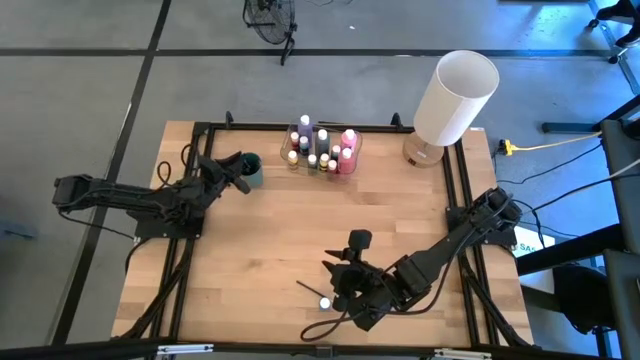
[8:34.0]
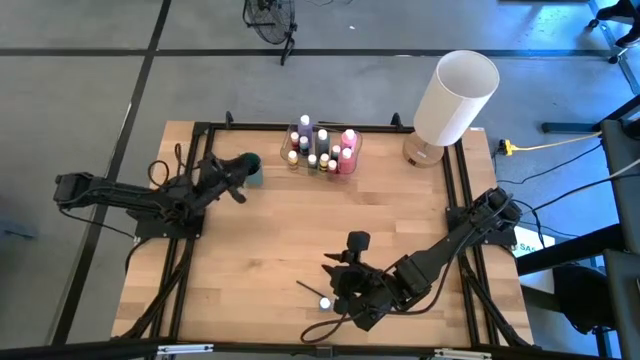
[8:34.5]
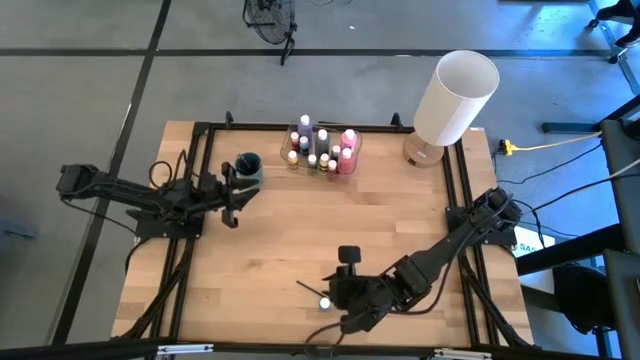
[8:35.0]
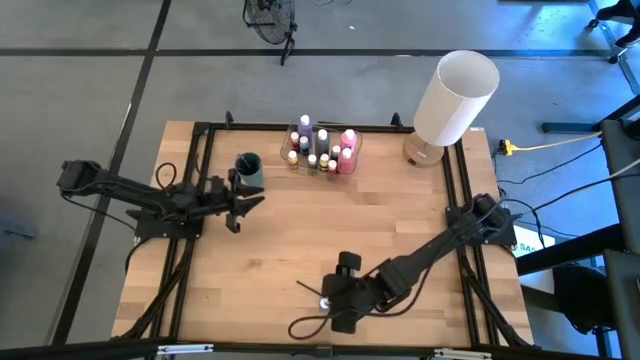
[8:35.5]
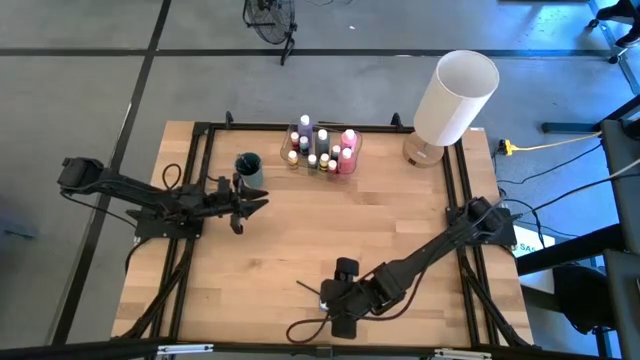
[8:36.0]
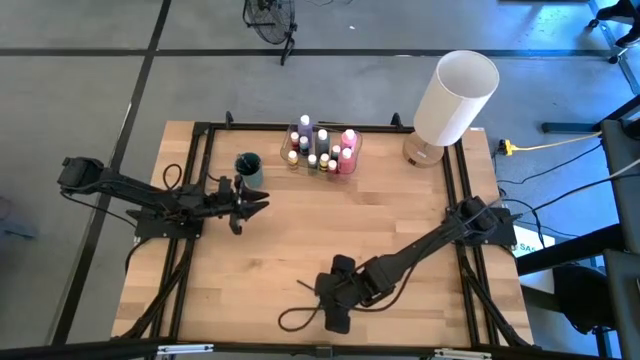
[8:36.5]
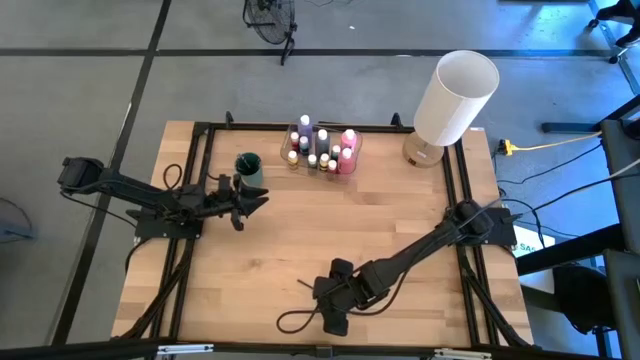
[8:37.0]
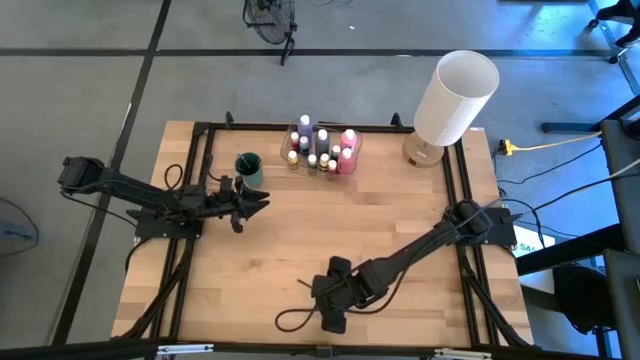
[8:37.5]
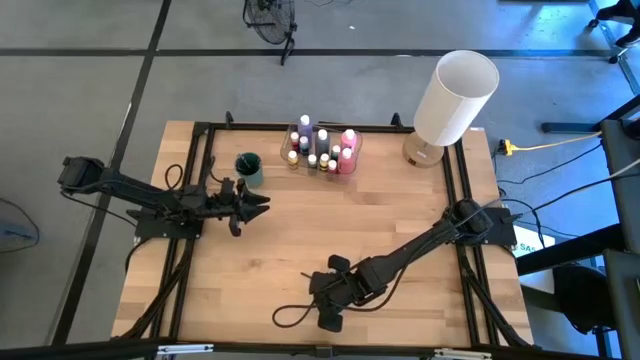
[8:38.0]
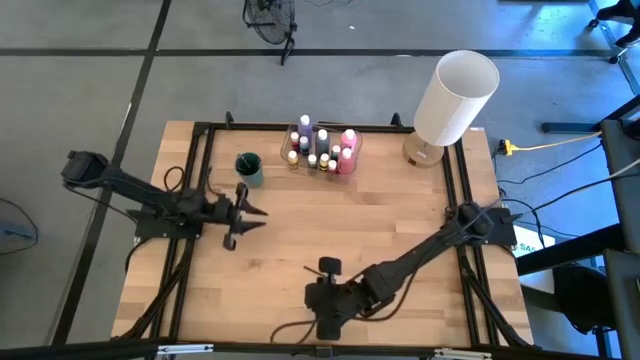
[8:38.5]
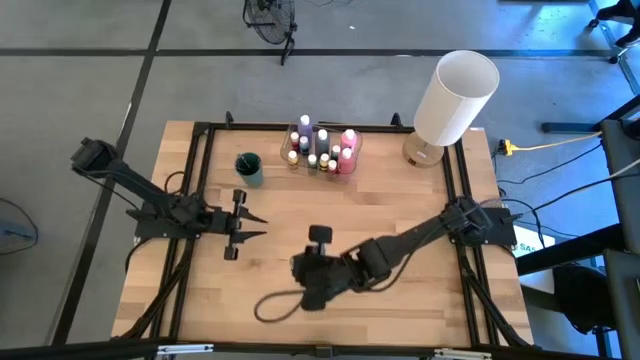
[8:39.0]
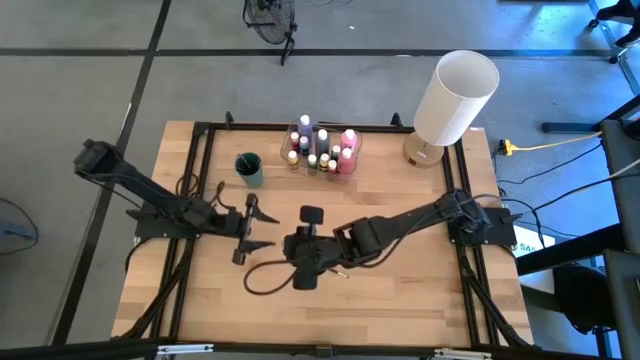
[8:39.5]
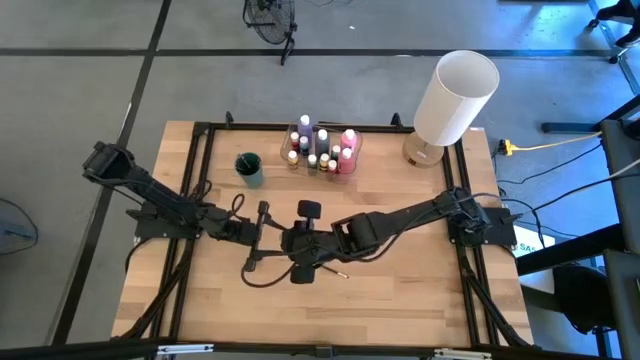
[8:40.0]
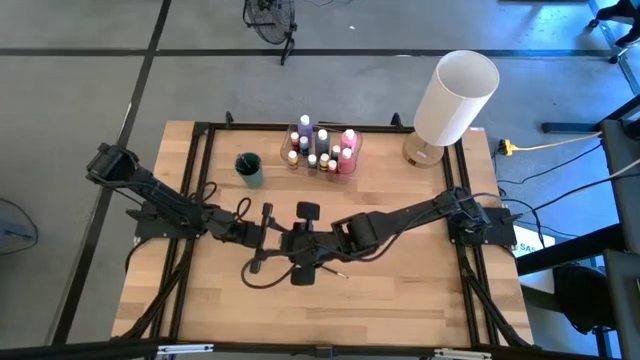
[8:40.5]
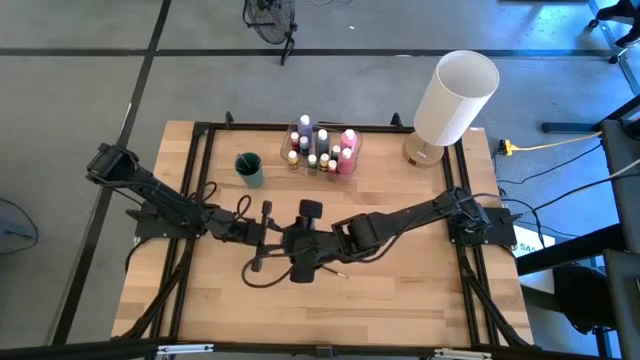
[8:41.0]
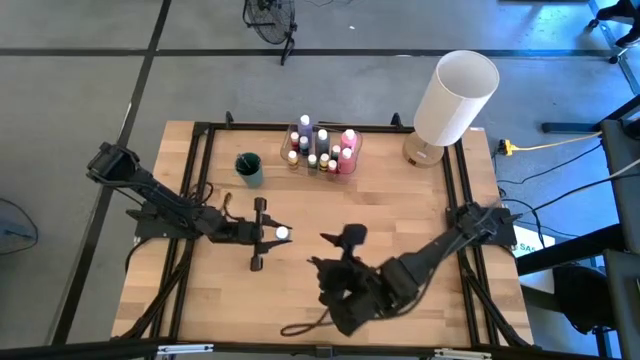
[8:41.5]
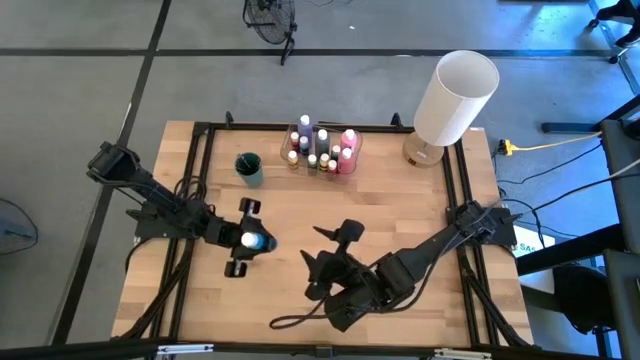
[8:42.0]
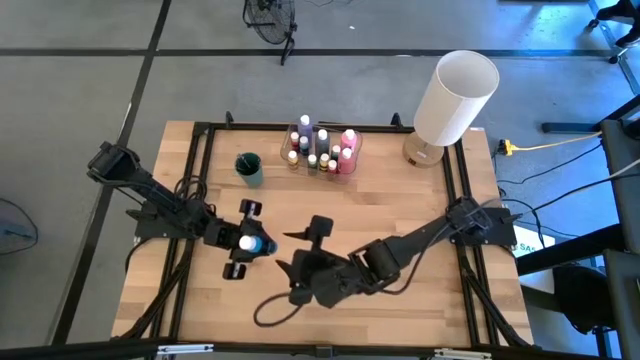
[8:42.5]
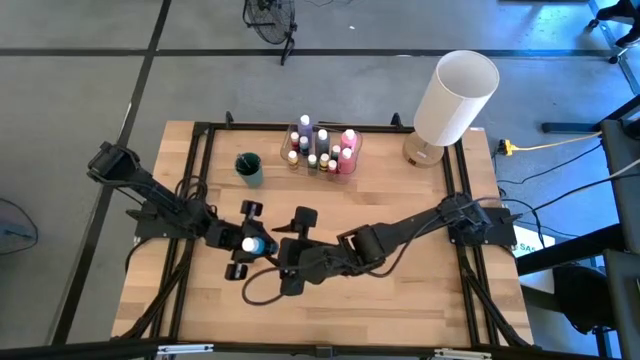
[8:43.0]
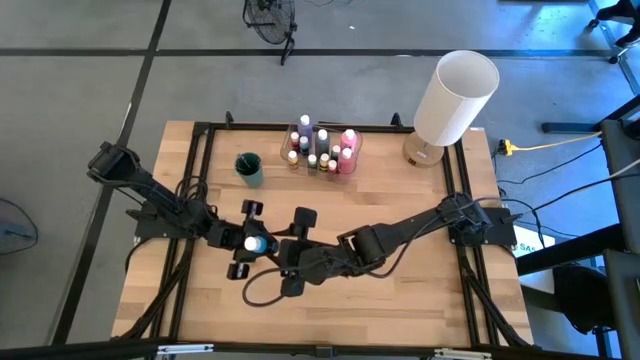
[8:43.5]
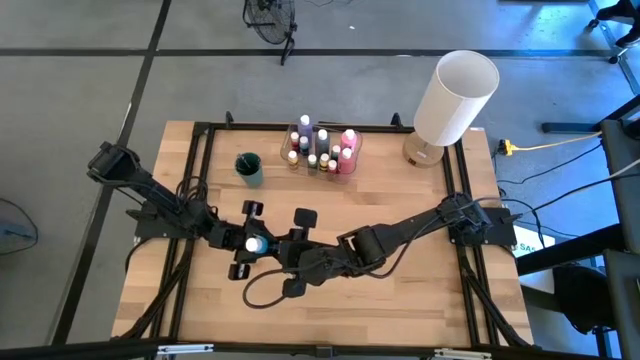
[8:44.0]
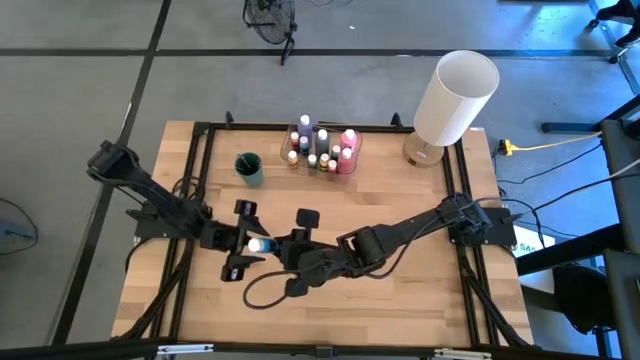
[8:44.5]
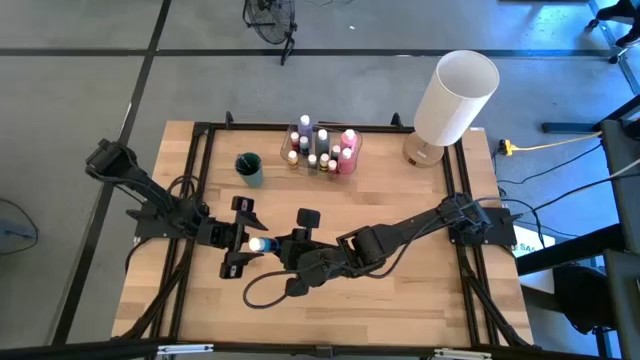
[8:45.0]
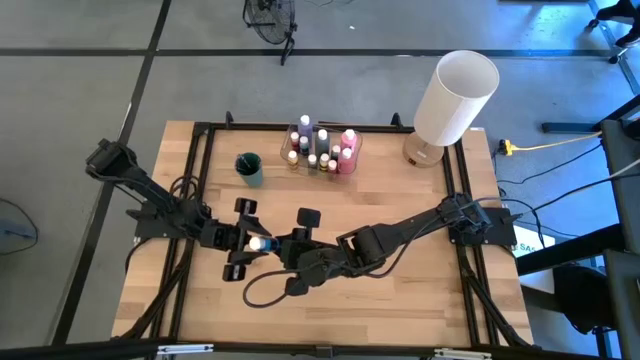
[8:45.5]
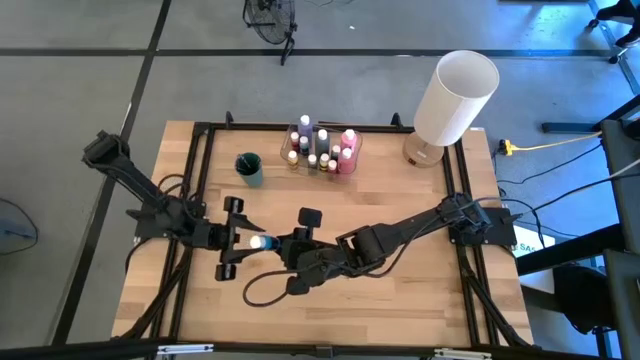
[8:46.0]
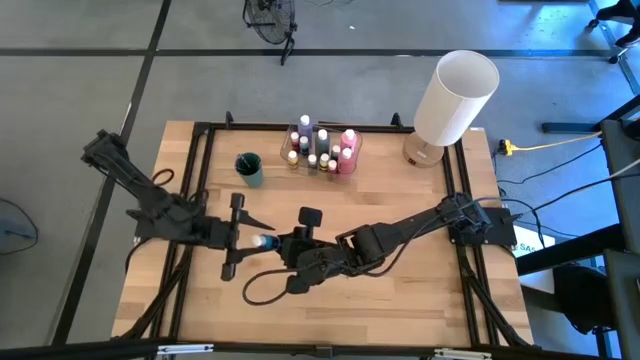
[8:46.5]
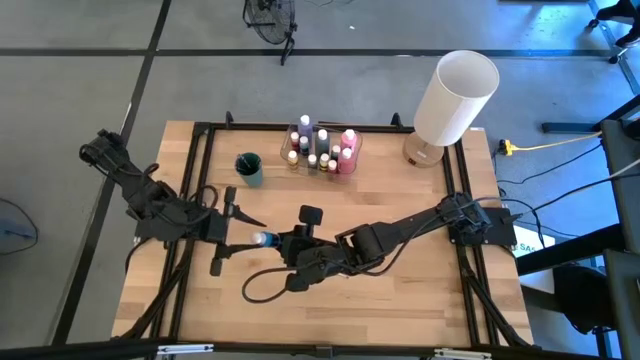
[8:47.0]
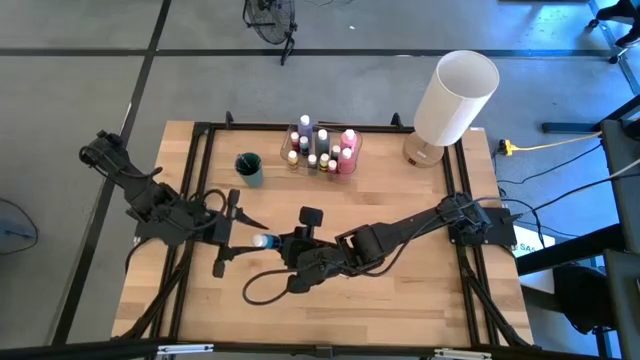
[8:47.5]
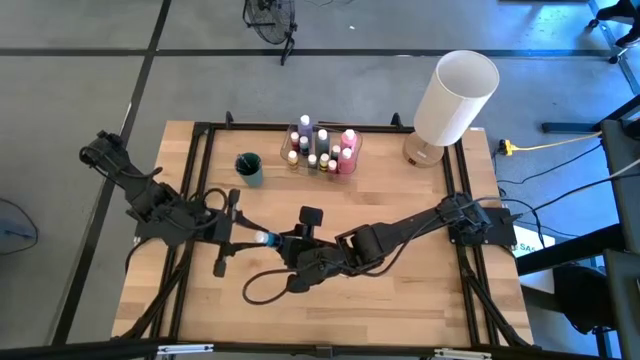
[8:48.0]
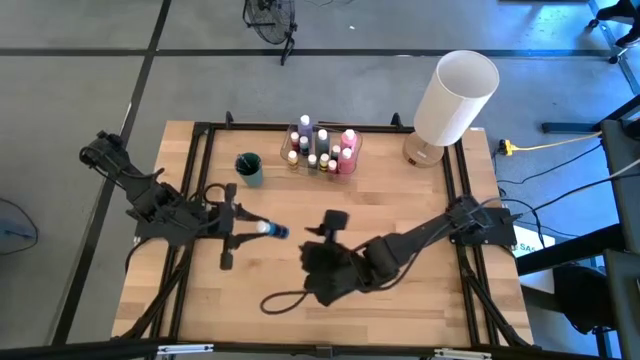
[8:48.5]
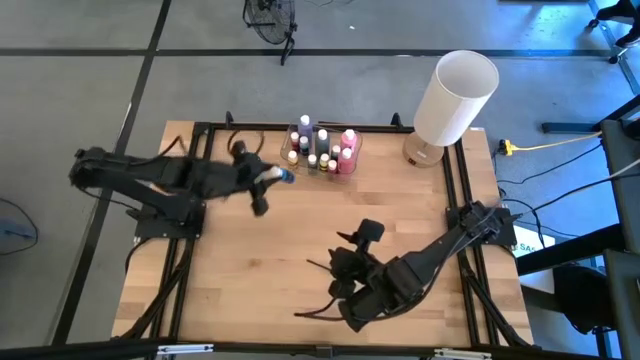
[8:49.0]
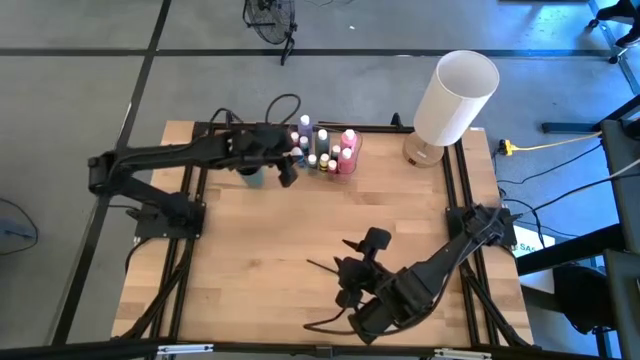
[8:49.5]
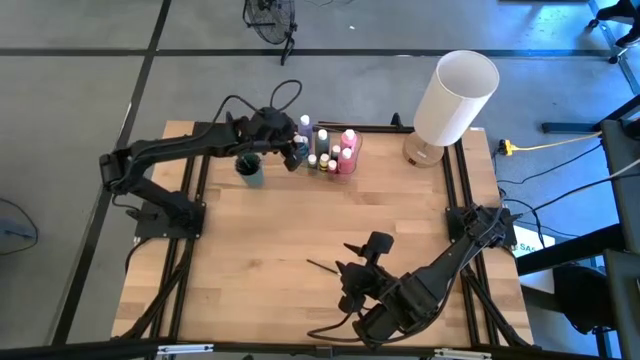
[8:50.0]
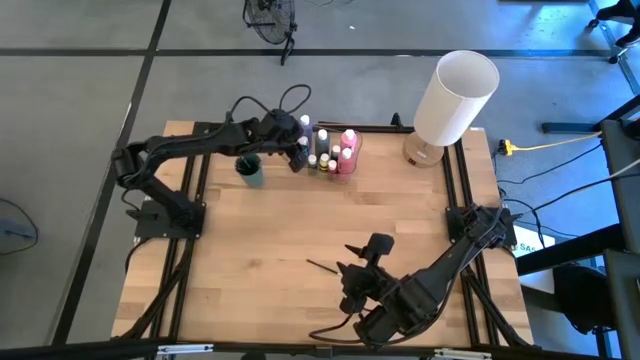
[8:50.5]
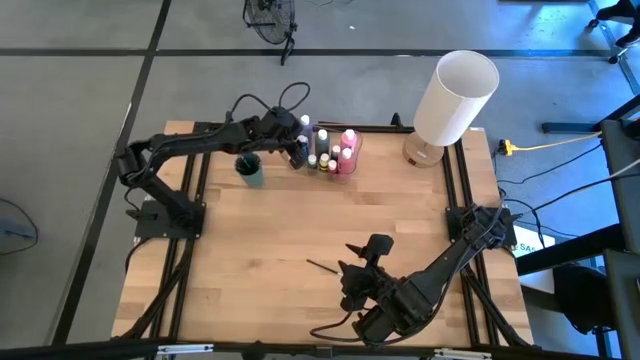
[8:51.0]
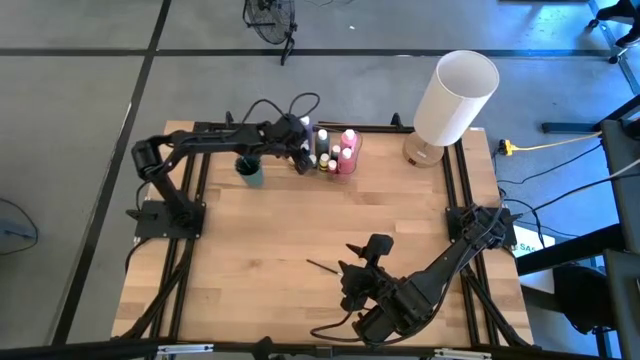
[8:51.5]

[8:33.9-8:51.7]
Task: Pick & Place Paint Supplies
Put the blue paint bottle into the transparent bin

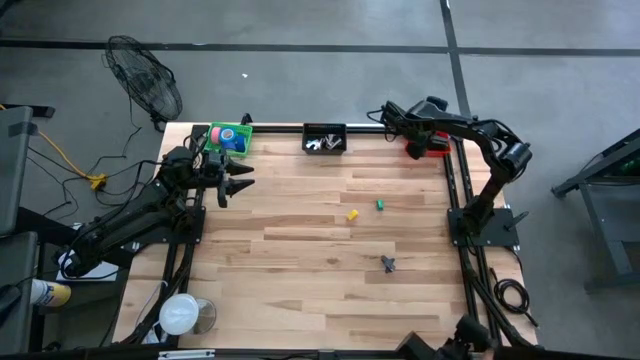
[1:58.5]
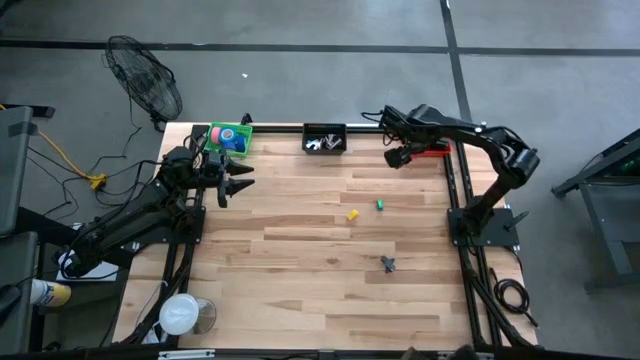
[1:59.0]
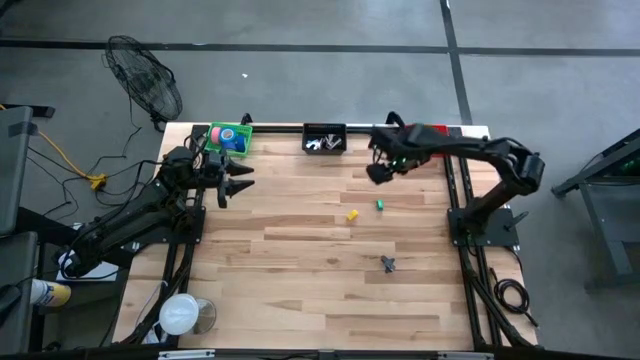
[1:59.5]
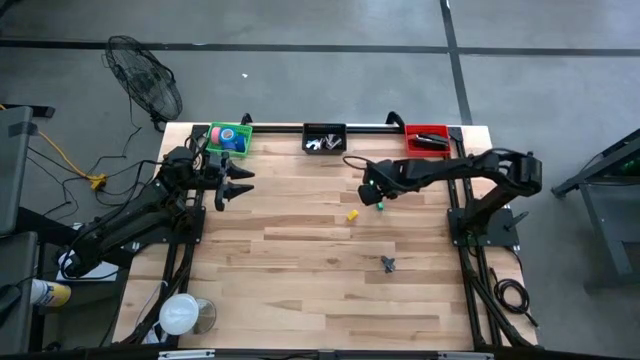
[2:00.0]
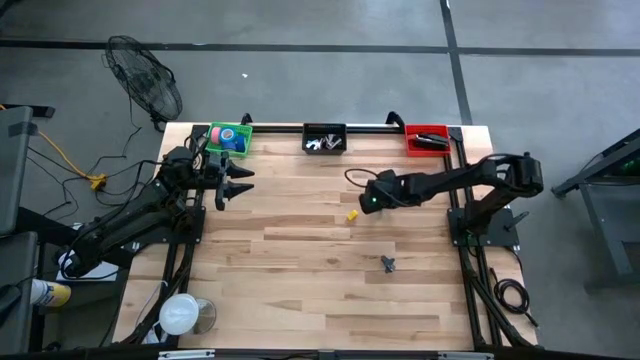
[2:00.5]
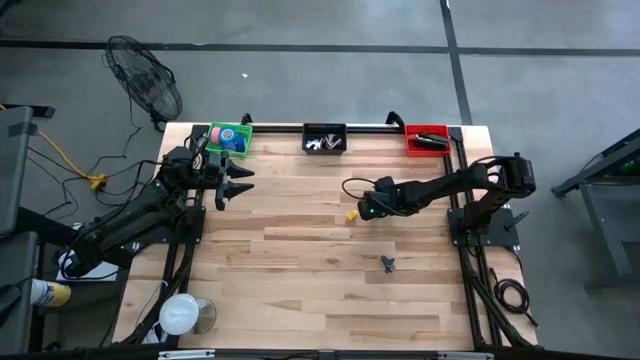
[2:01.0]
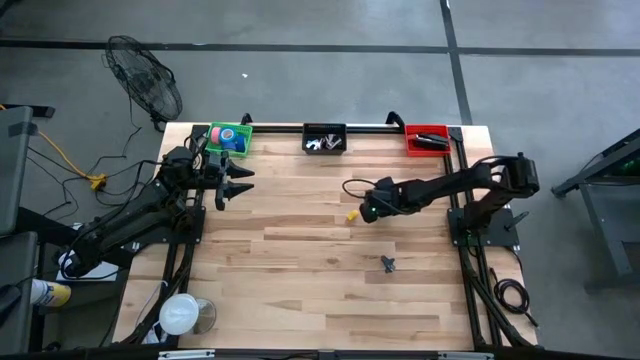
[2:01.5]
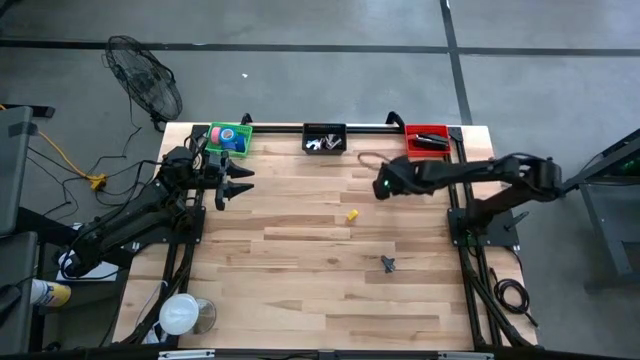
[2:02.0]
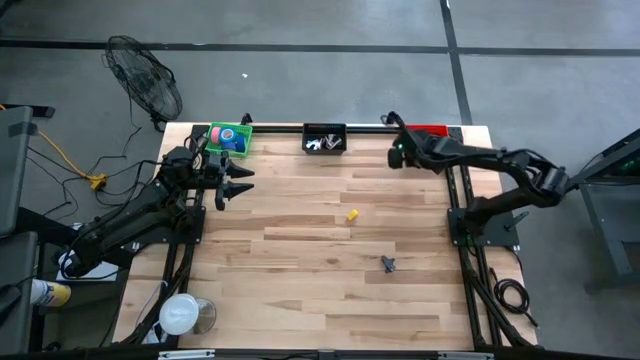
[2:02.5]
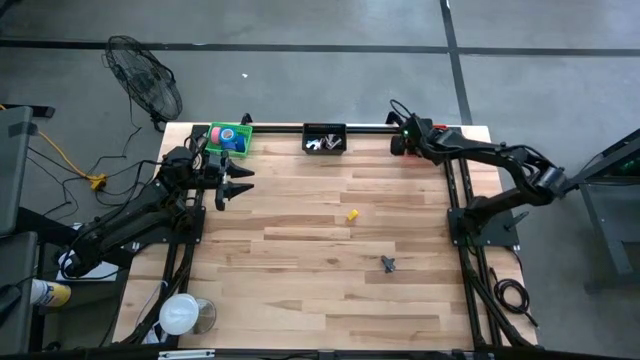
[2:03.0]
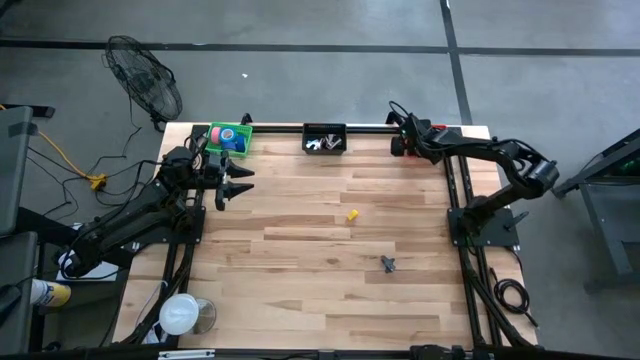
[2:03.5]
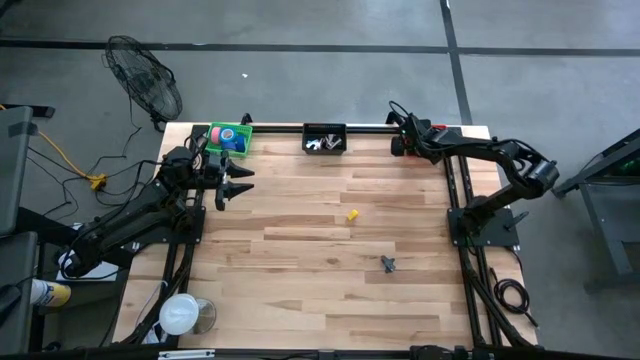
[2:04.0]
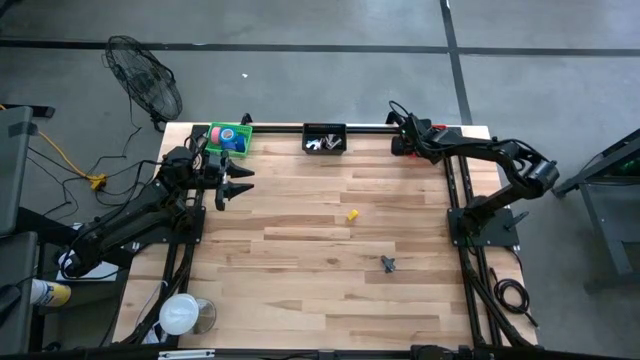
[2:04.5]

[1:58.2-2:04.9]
Task: Pick and place Stapler, Stapler remover, tape
Put the green stapler in the red bin
